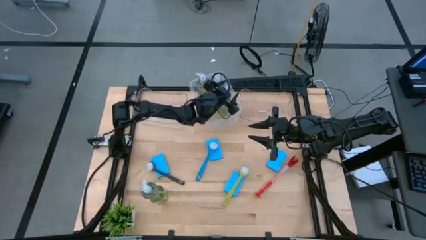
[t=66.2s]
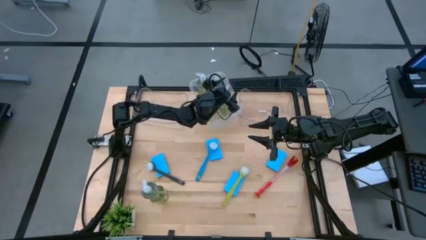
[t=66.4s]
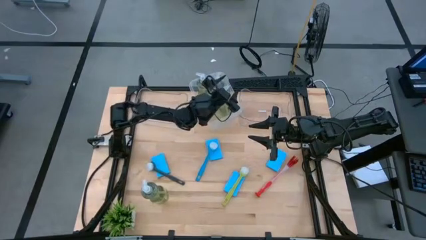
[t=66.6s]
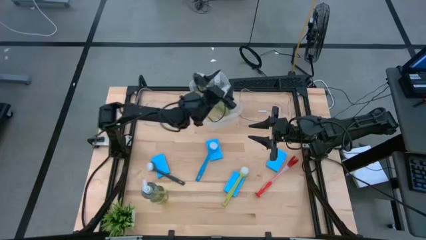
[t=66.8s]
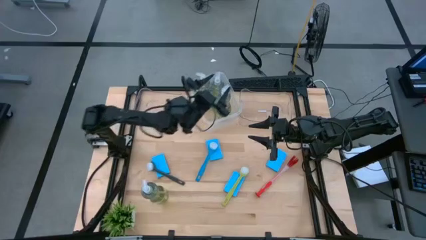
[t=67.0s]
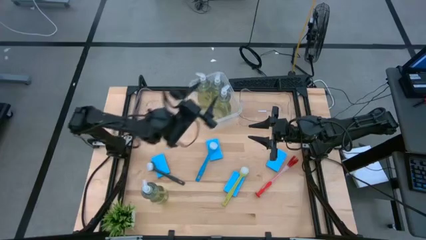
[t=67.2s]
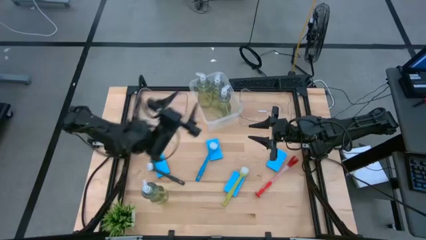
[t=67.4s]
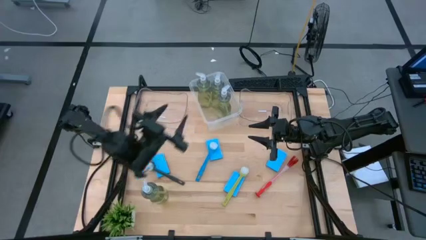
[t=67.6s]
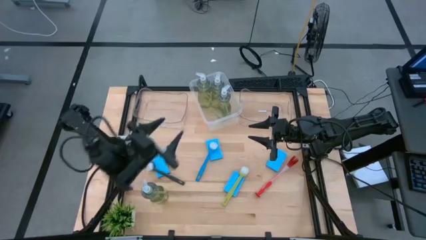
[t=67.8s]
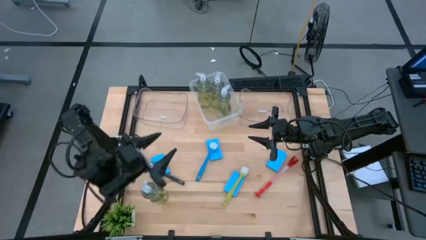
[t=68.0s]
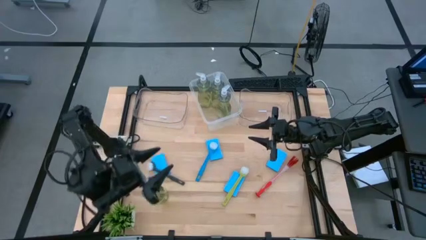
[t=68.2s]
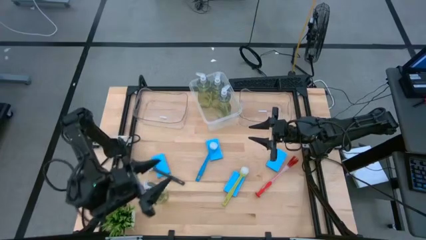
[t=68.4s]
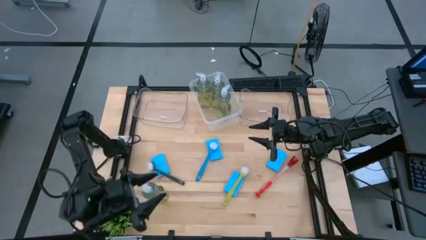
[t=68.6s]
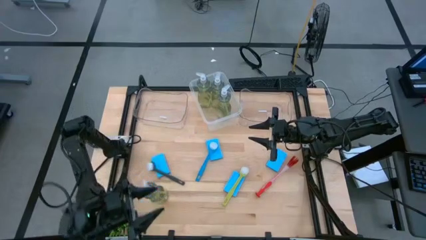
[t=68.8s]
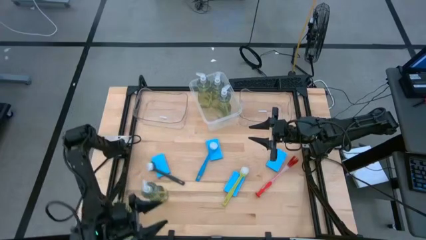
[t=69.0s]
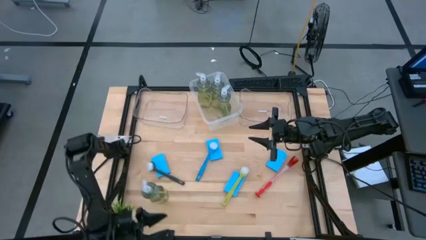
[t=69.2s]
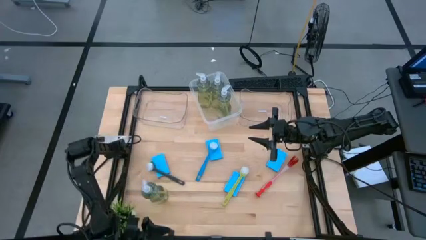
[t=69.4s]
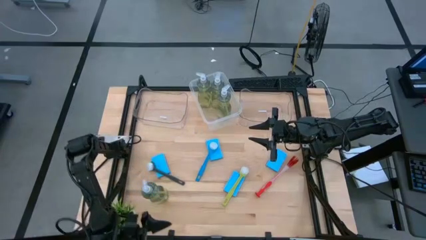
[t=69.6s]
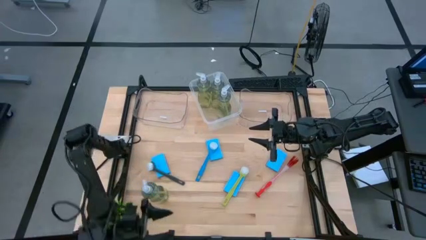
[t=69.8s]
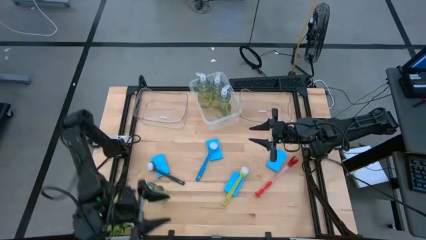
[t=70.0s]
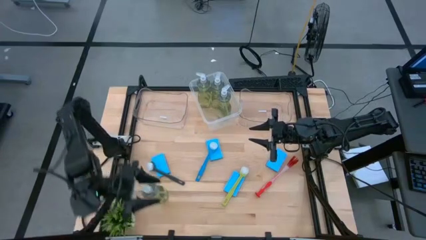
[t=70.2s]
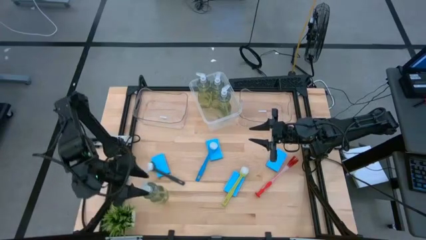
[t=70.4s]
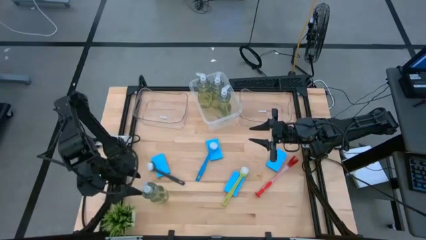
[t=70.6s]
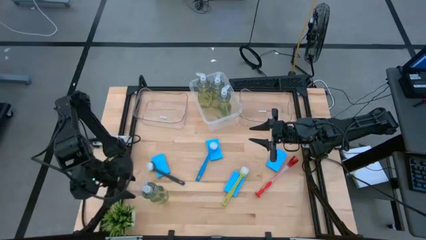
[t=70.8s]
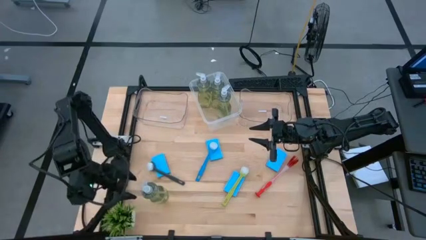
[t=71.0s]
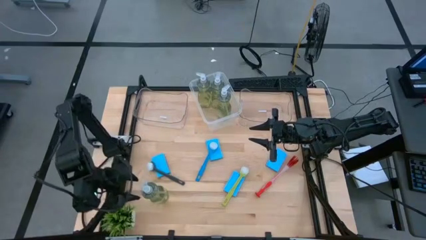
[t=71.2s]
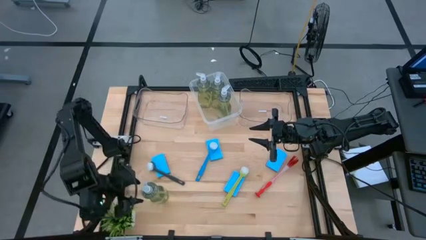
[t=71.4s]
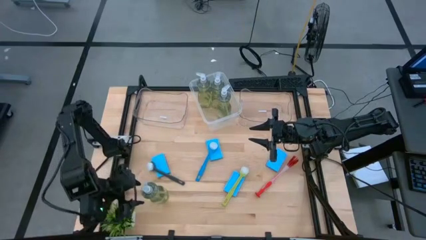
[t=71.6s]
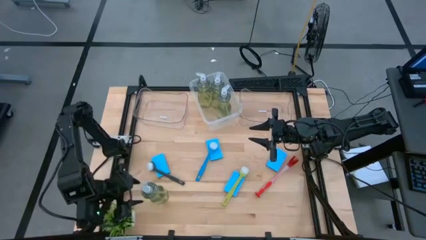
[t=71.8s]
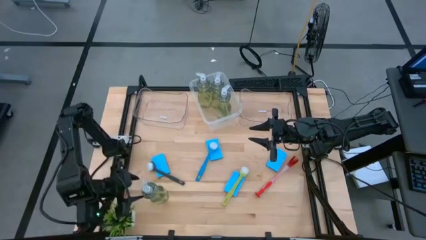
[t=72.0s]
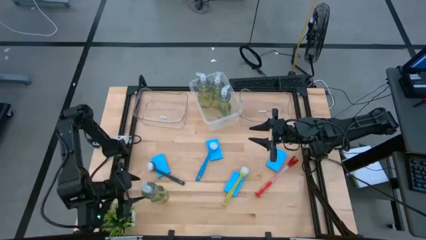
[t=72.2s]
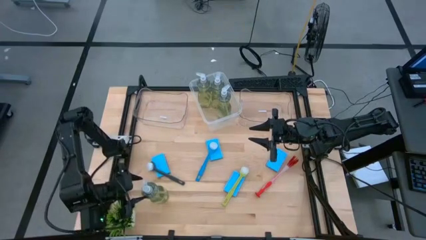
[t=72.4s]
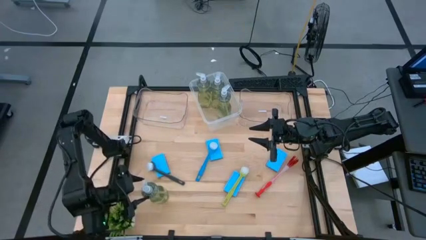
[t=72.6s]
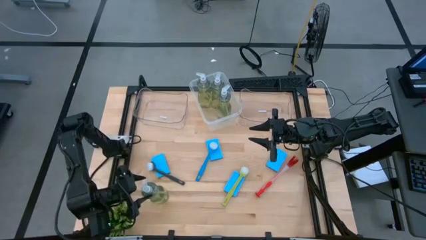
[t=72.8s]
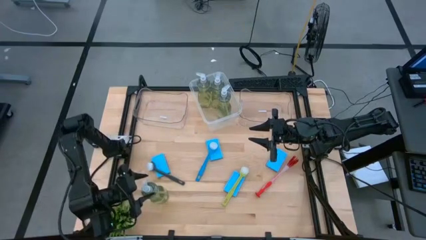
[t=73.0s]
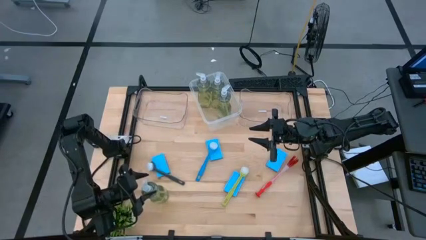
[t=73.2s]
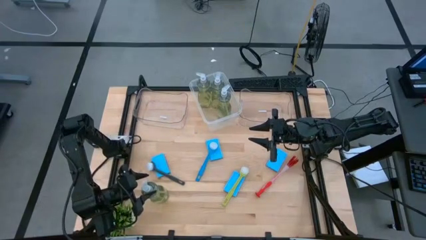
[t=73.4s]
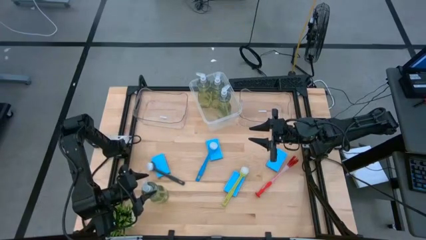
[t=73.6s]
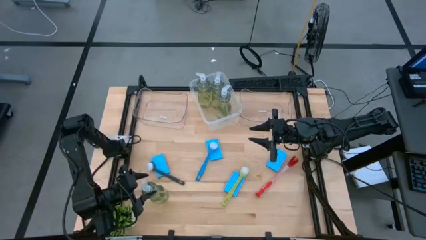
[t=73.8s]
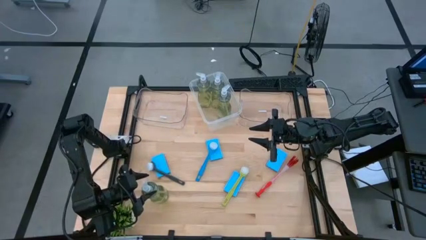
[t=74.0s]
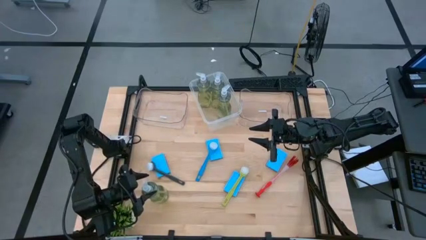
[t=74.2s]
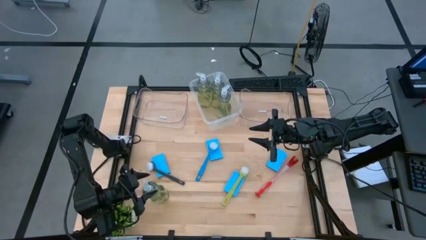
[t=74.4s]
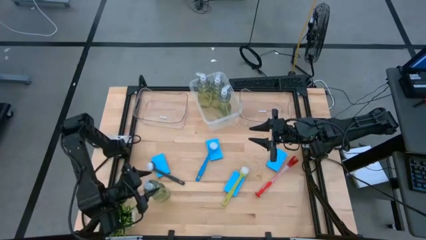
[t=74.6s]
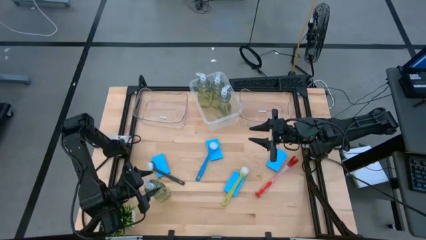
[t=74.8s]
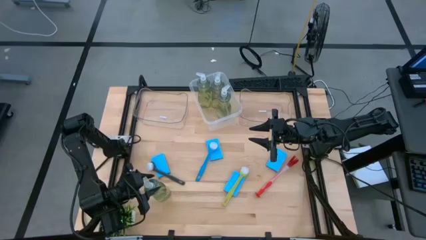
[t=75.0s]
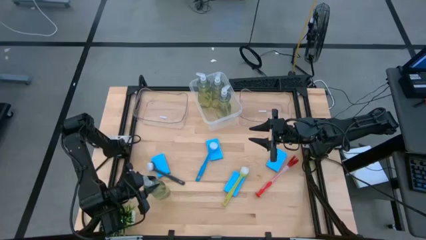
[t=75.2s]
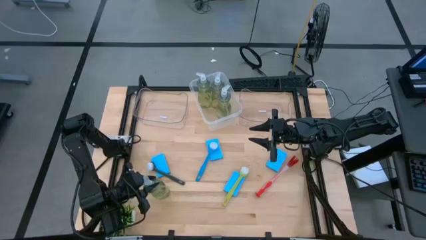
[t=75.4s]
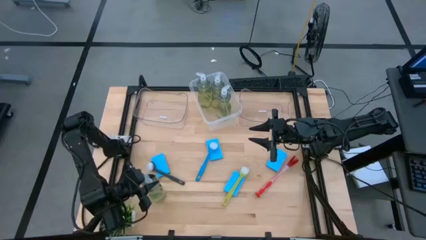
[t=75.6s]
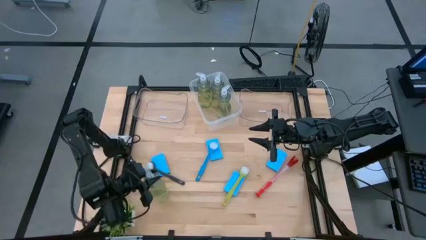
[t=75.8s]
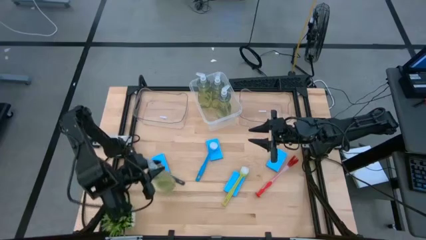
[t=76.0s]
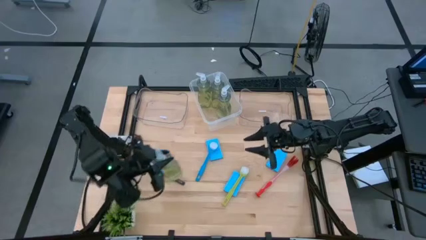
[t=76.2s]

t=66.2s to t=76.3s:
Task: Pick & Place Kitchen Sink Supplies
Put the dishwashing liquid bottle into the white bin
